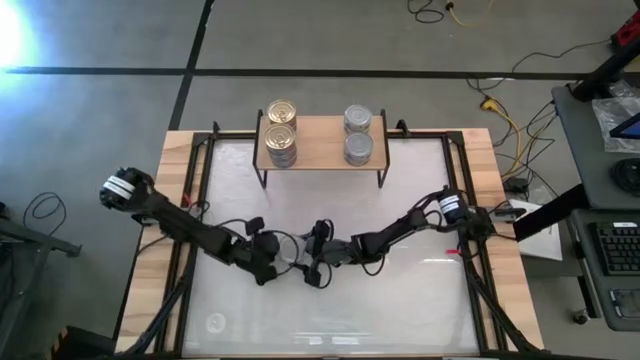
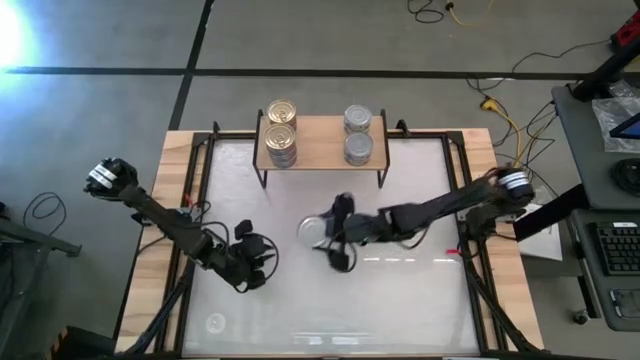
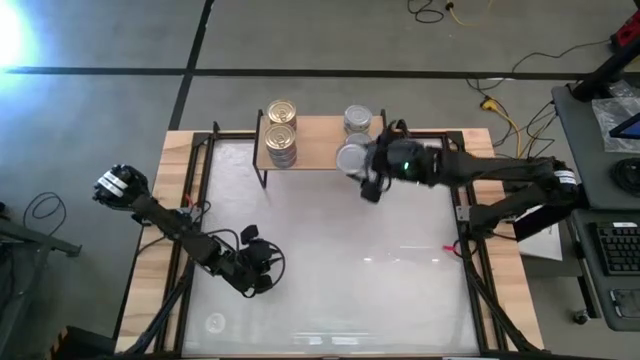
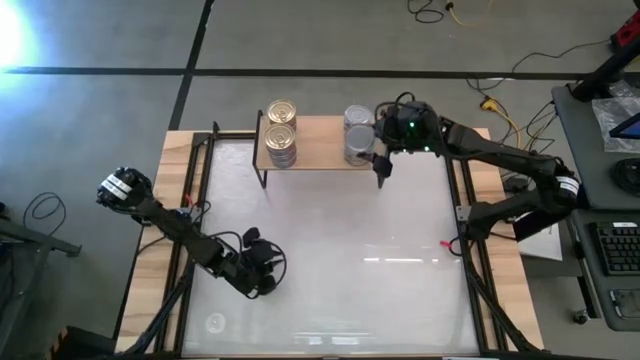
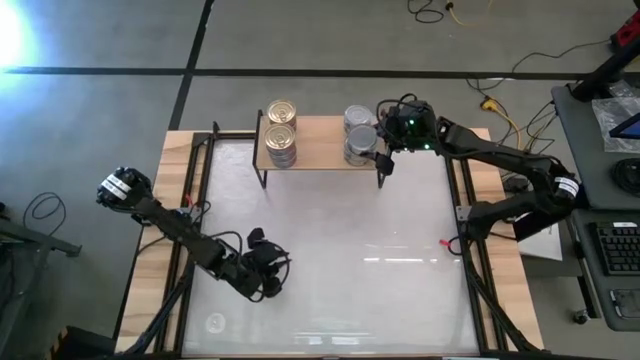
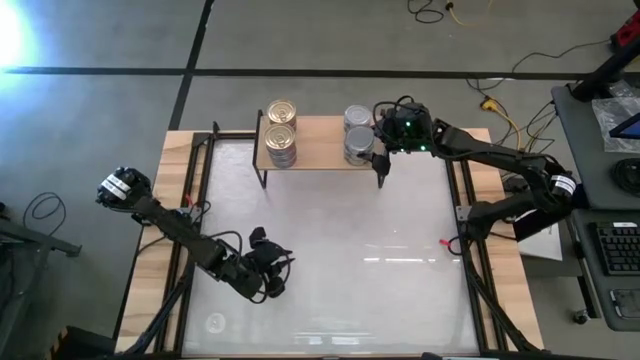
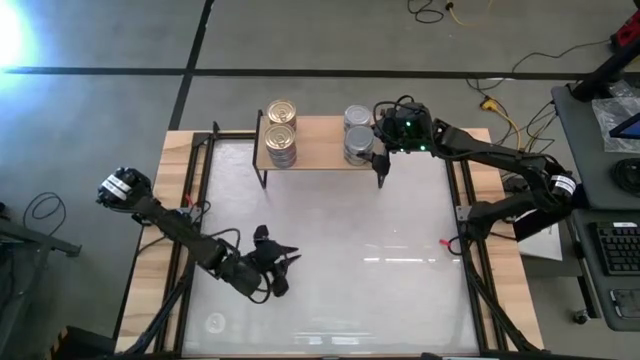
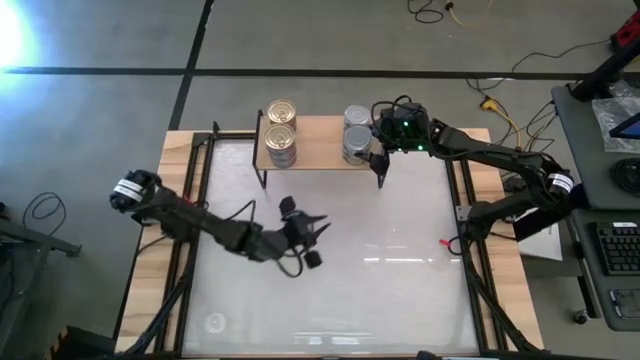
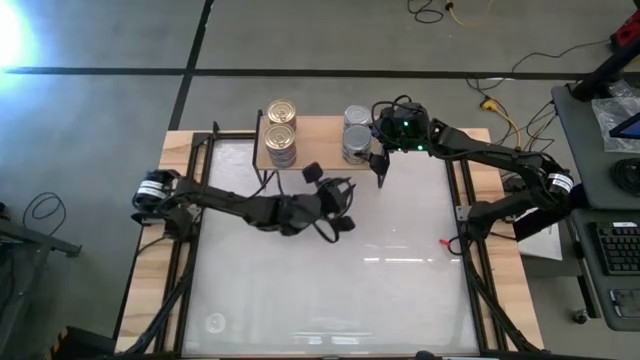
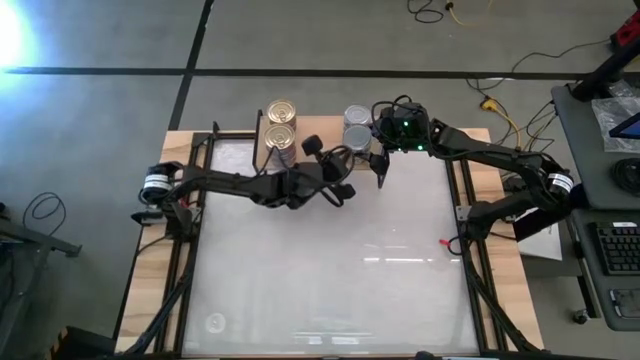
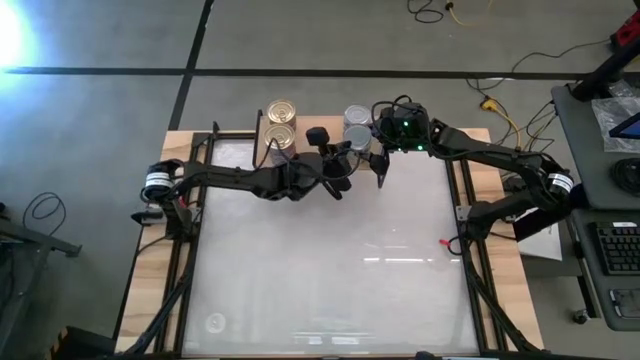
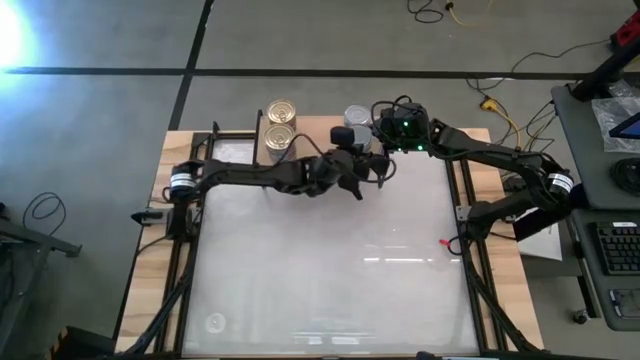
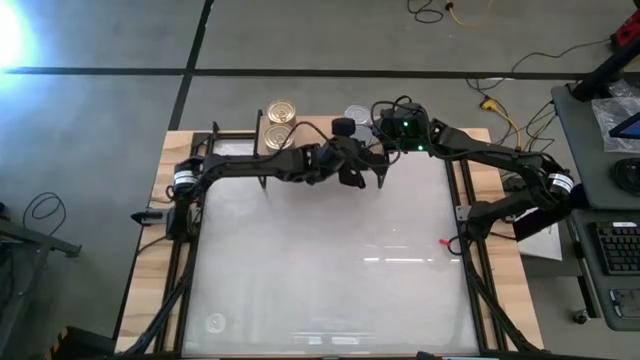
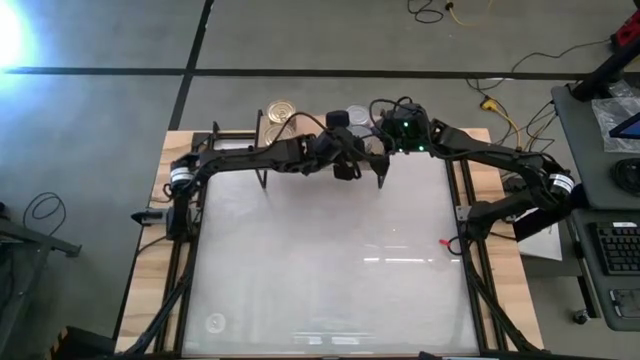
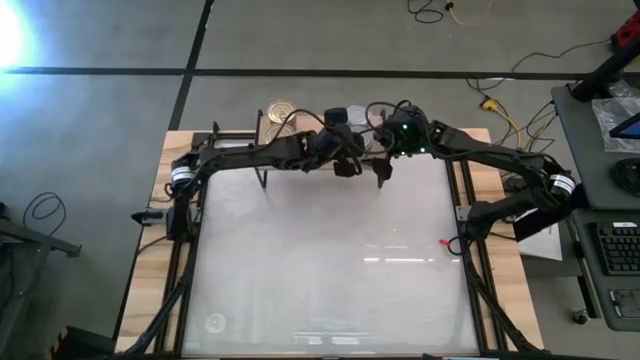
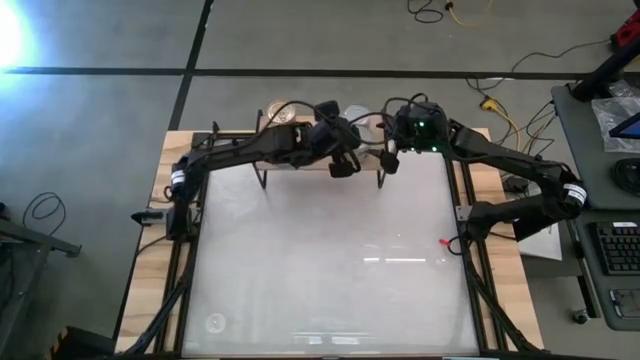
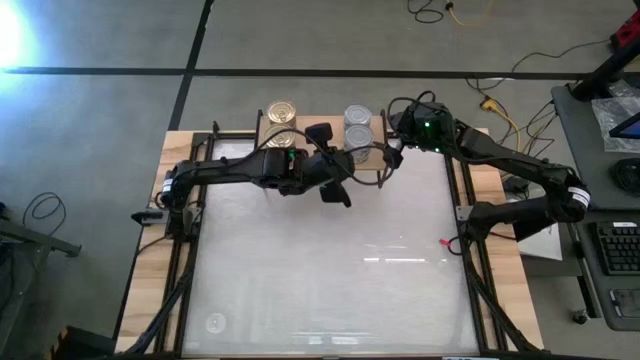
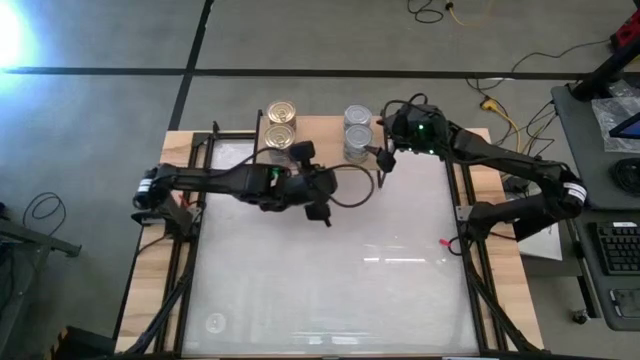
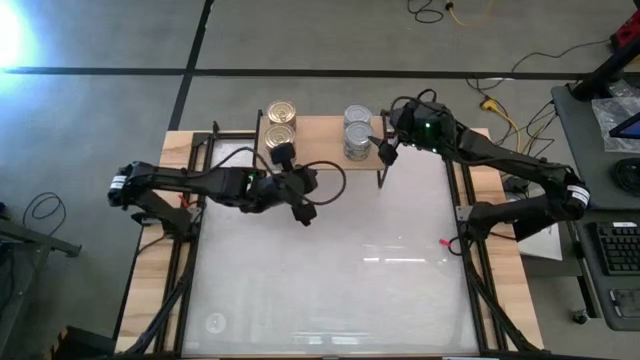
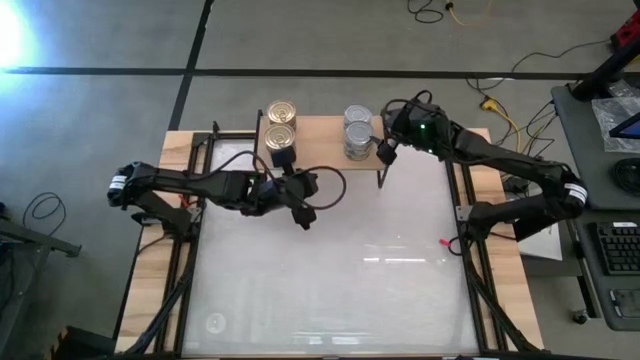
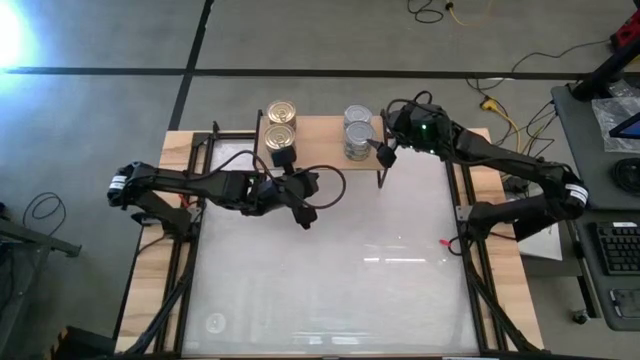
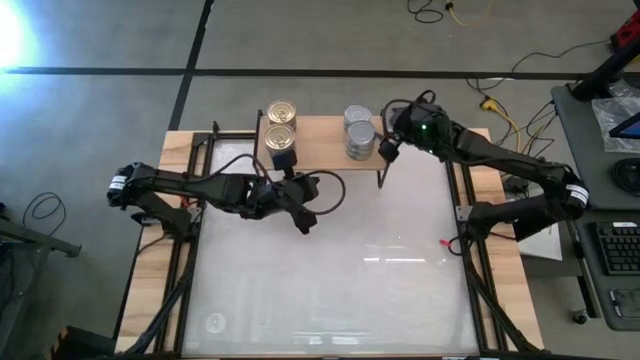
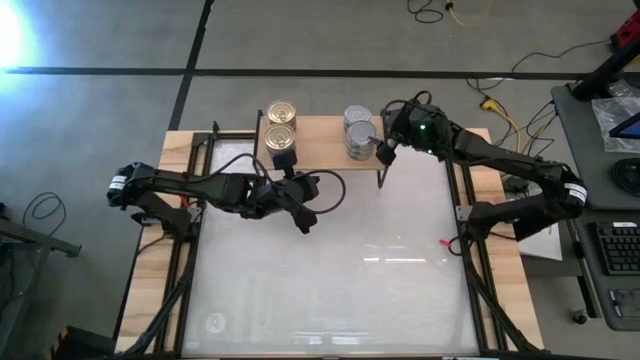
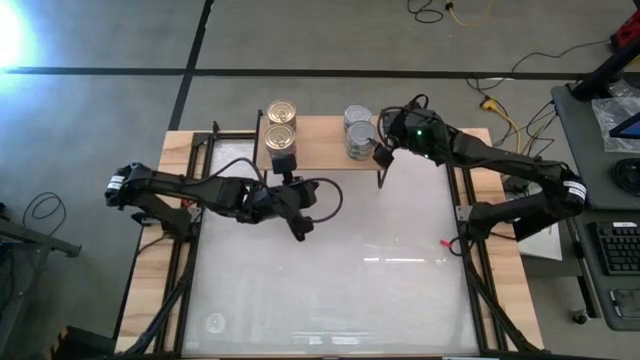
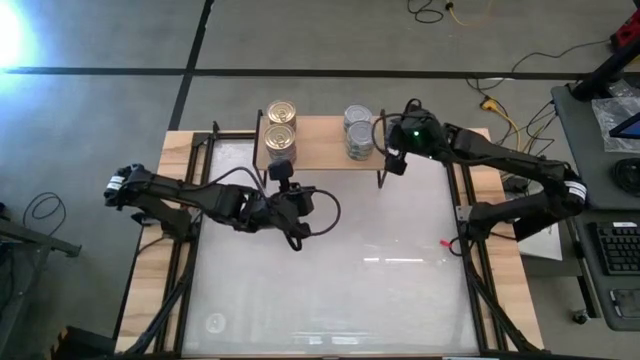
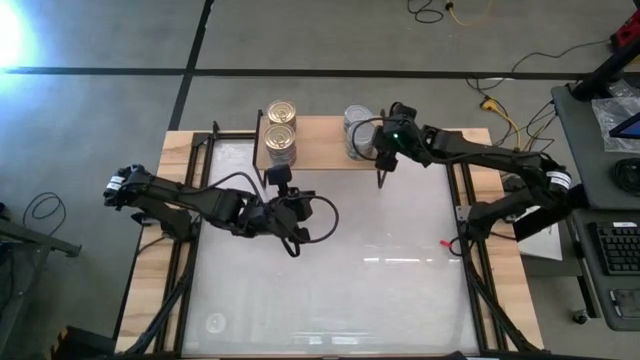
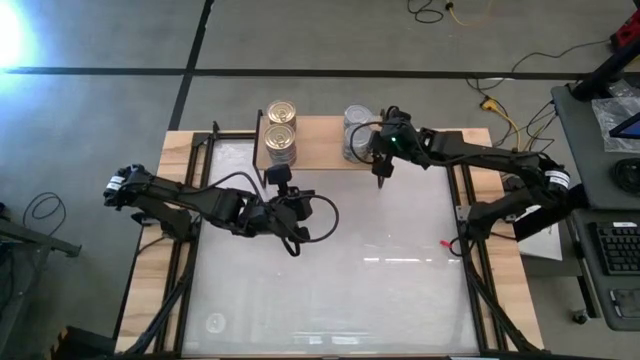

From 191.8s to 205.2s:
Task: Stack canned seafood by type on shelf
Stack the green tuna can on top of the other green tuna on the shelf

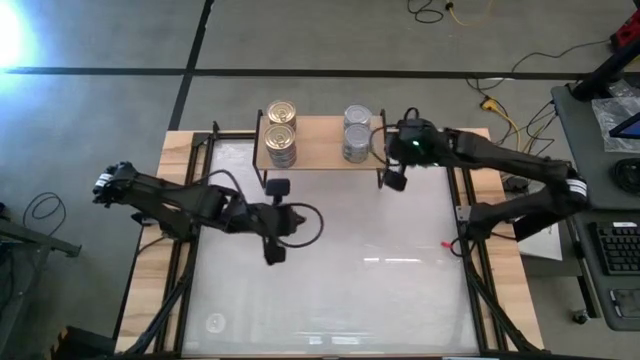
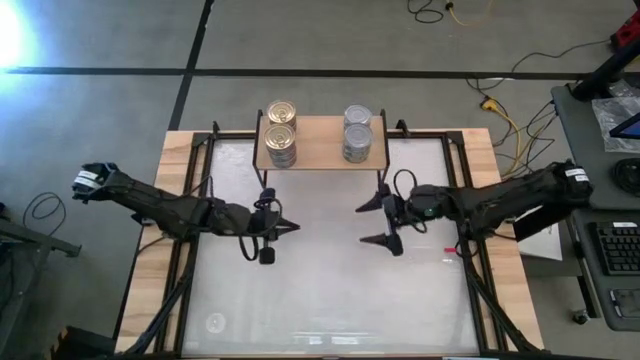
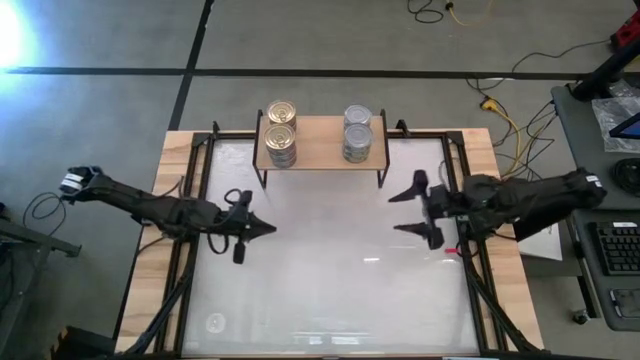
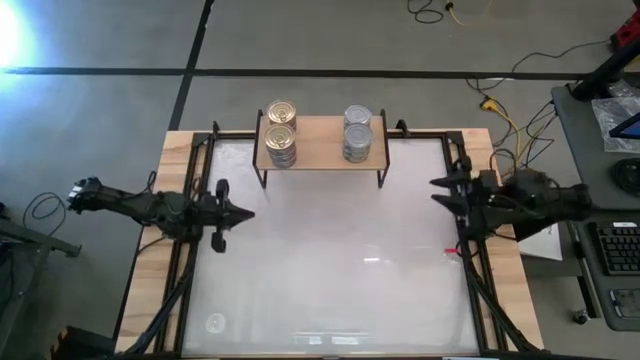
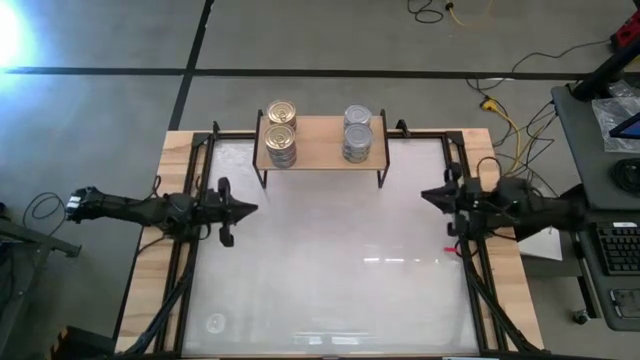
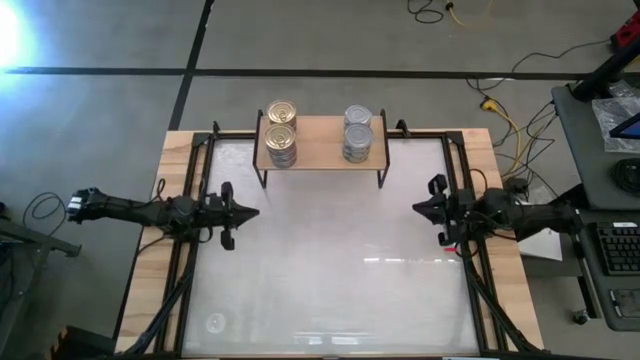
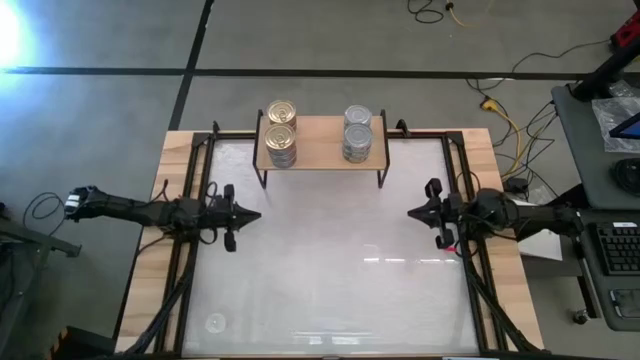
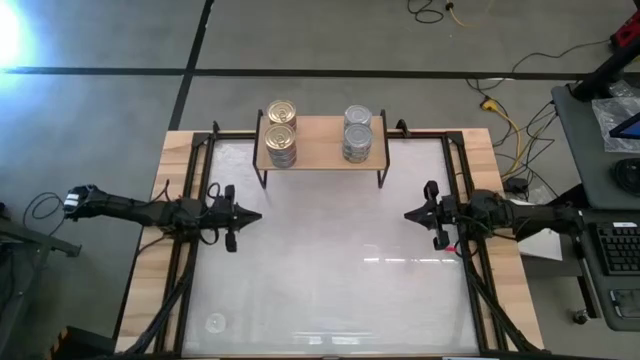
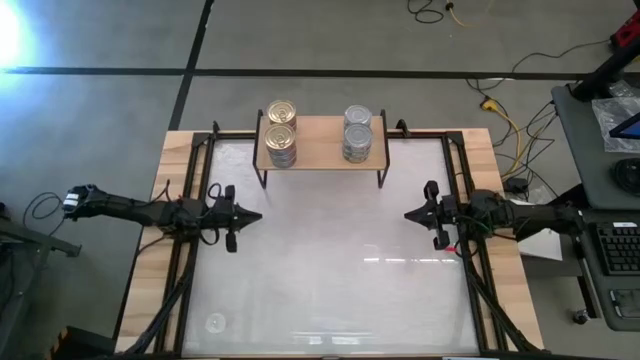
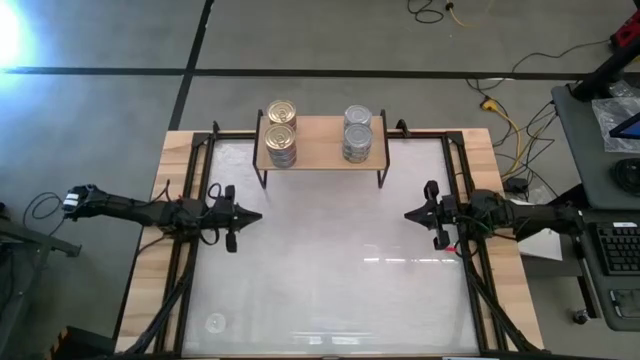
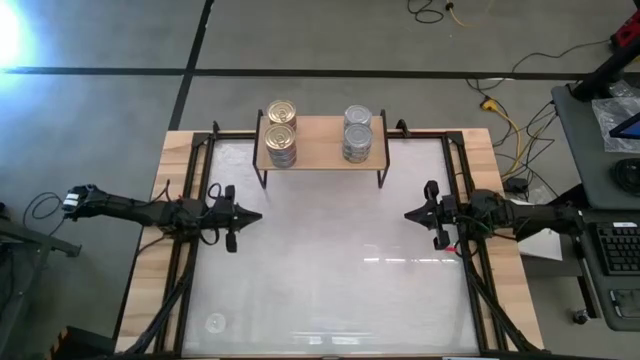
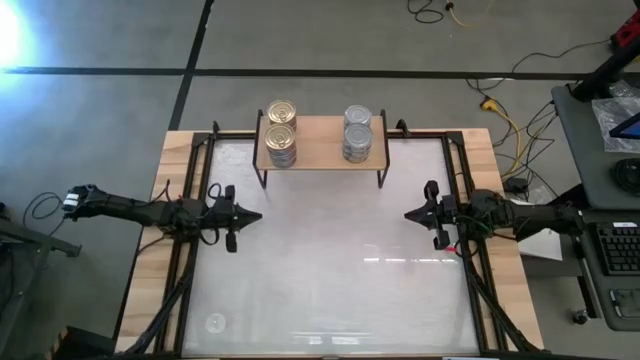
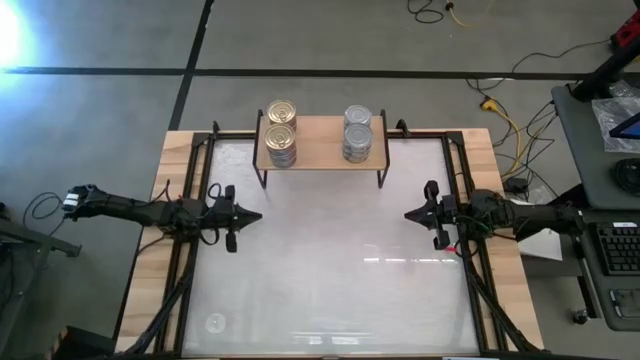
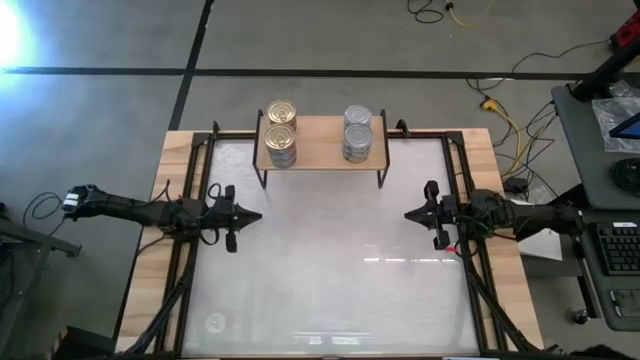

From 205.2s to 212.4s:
Return to Home Position

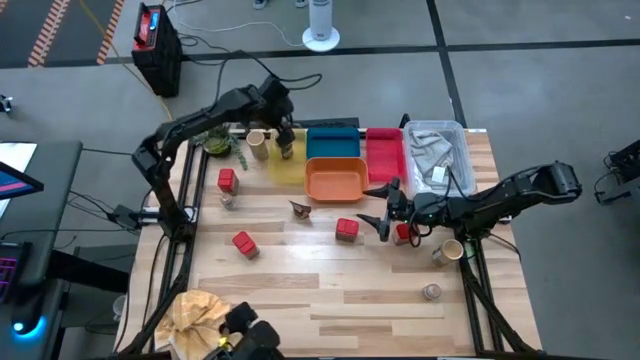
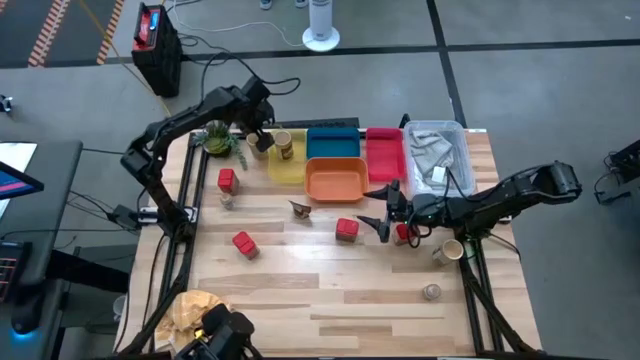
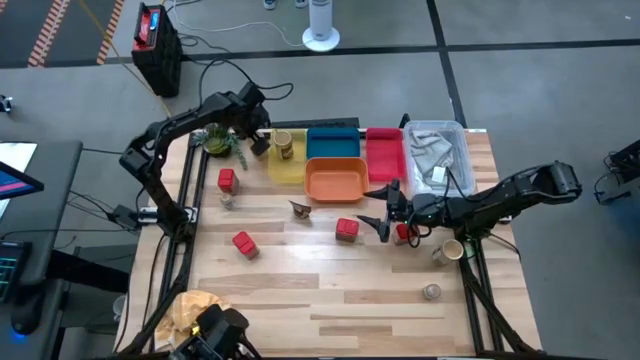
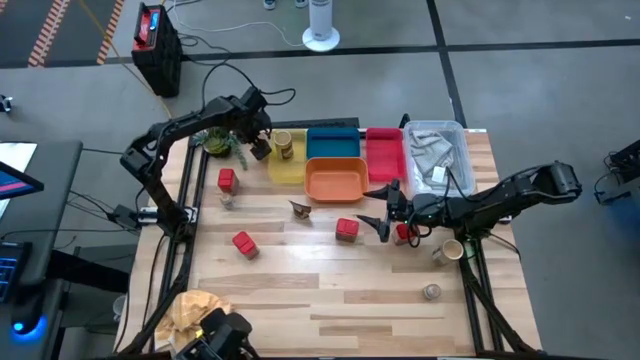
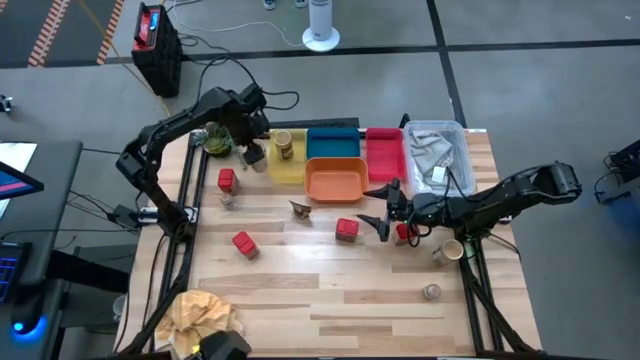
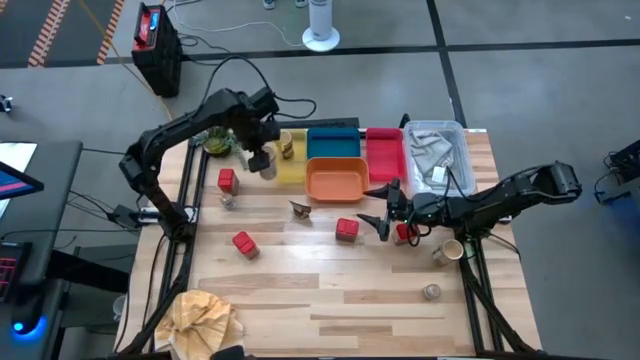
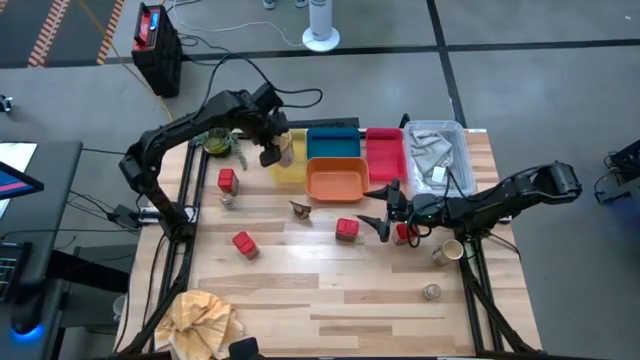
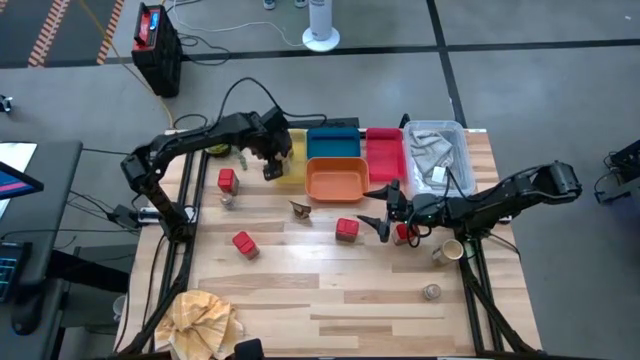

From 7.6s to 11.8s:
Task: Sort spices by type
Put the gold seasoning bottle into the yellow bin
